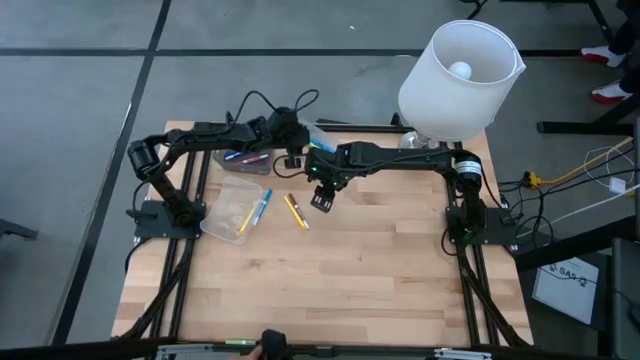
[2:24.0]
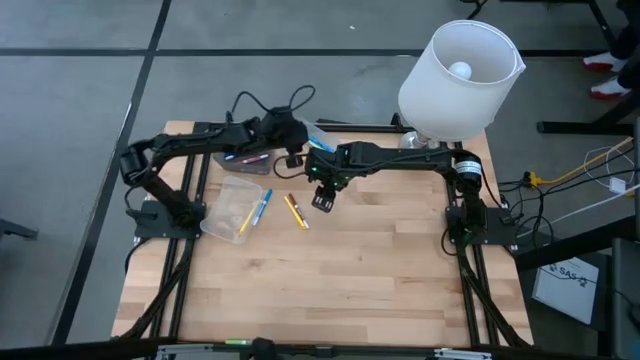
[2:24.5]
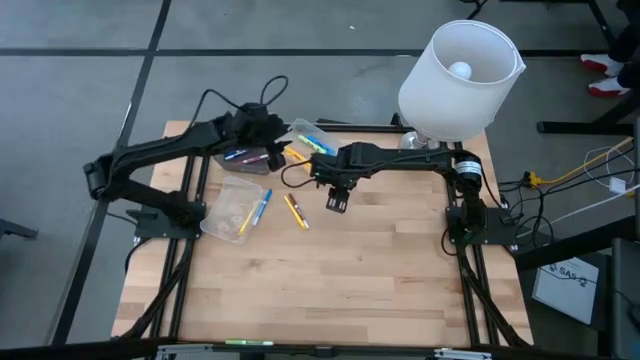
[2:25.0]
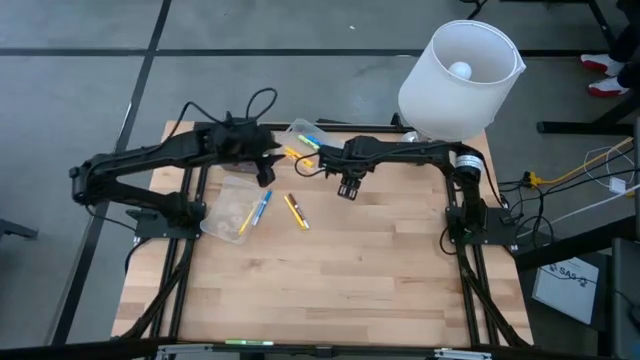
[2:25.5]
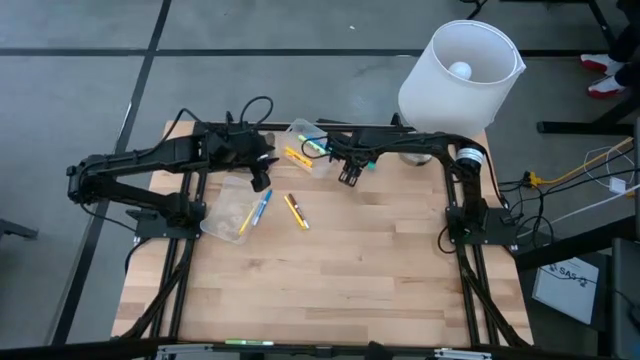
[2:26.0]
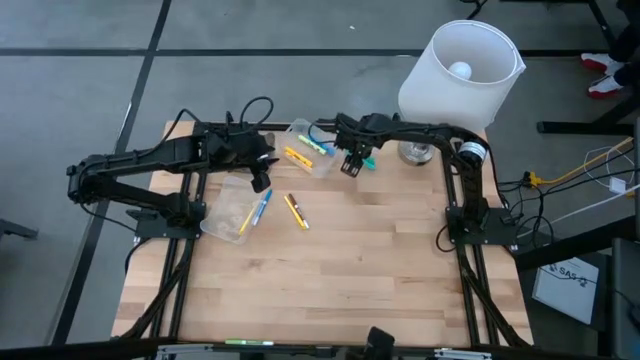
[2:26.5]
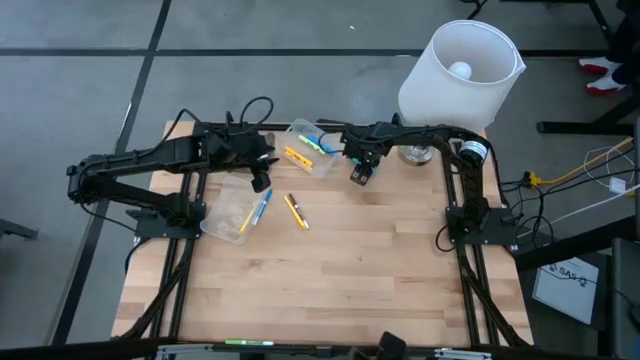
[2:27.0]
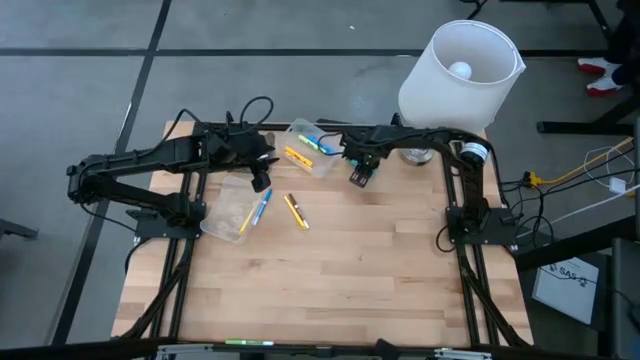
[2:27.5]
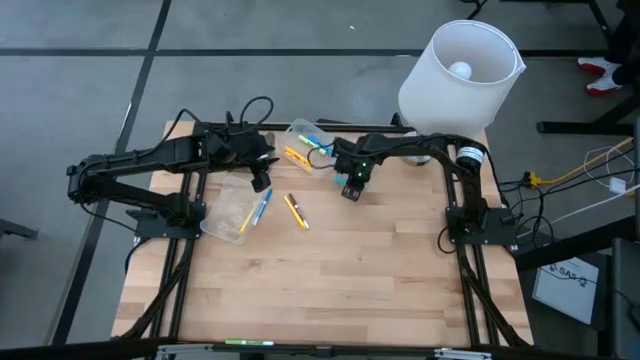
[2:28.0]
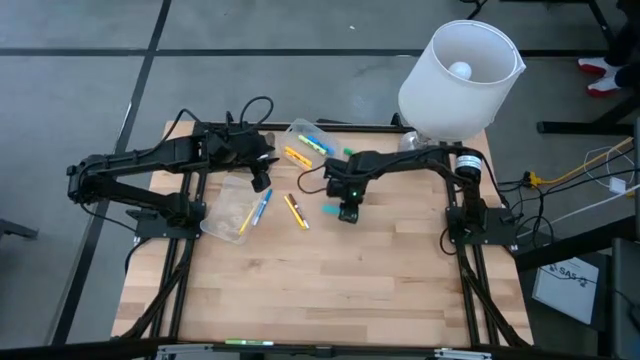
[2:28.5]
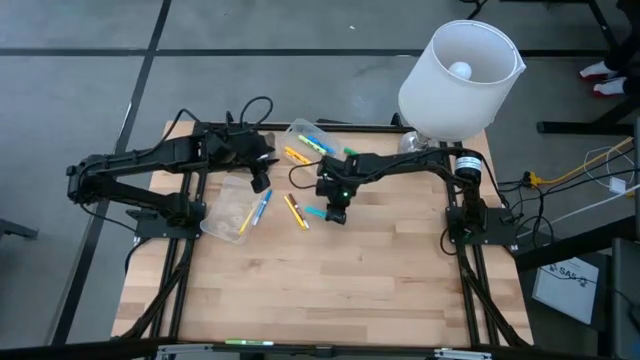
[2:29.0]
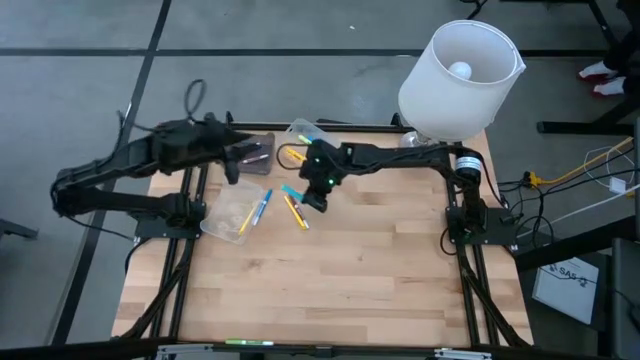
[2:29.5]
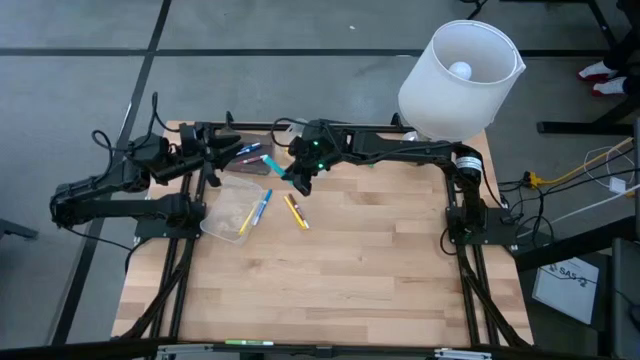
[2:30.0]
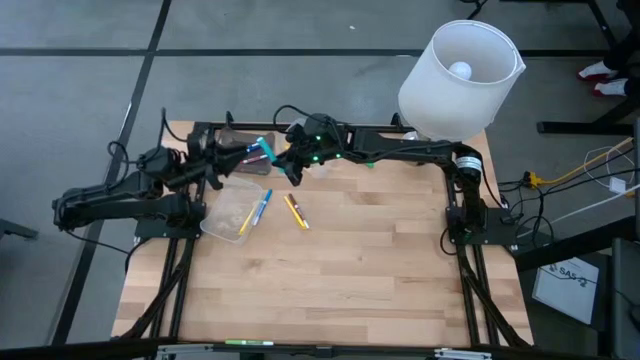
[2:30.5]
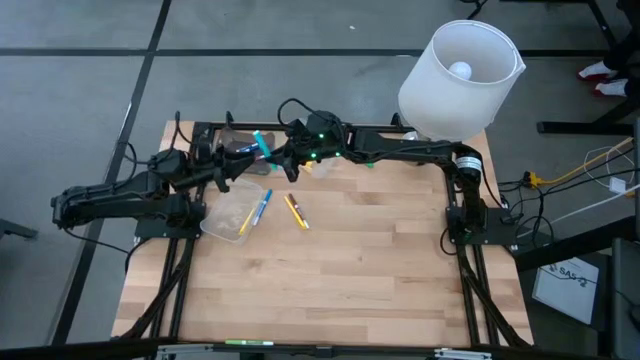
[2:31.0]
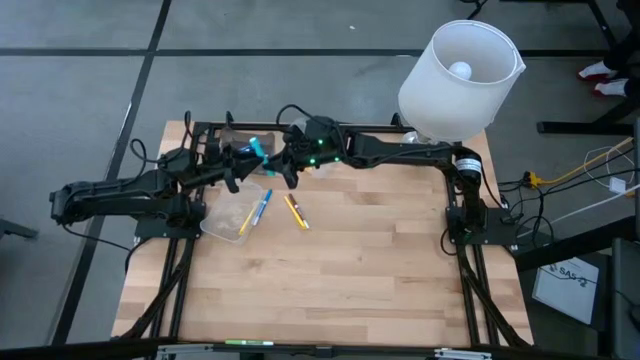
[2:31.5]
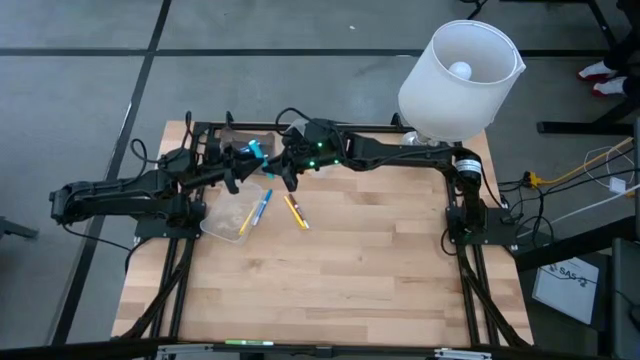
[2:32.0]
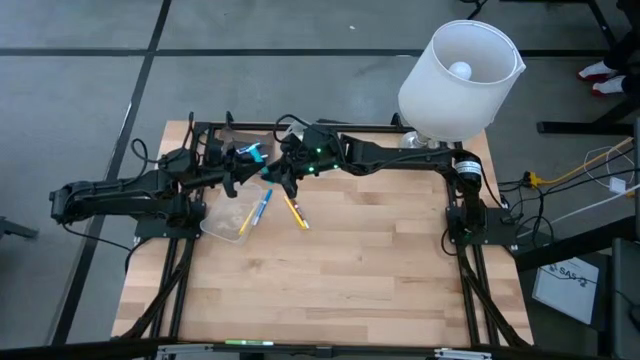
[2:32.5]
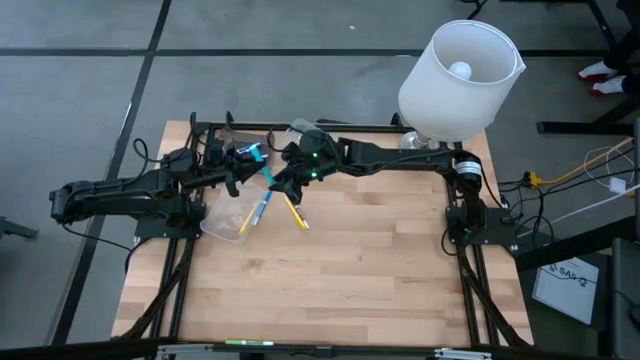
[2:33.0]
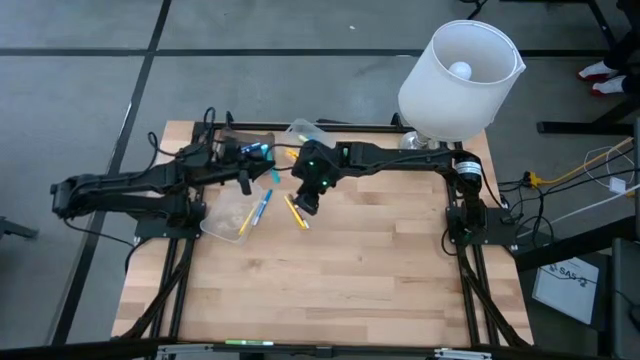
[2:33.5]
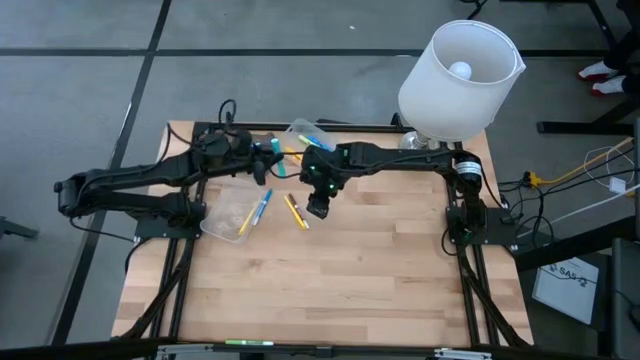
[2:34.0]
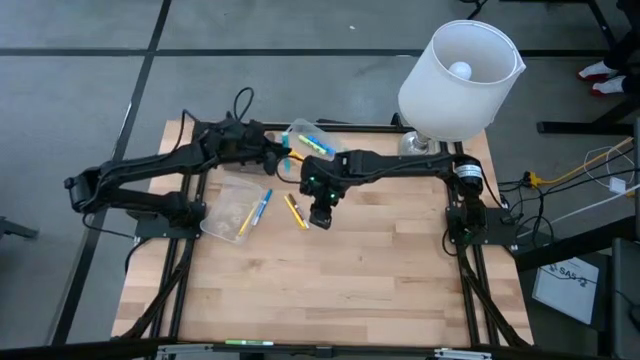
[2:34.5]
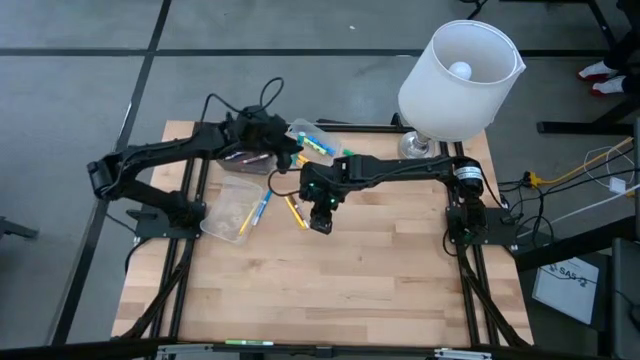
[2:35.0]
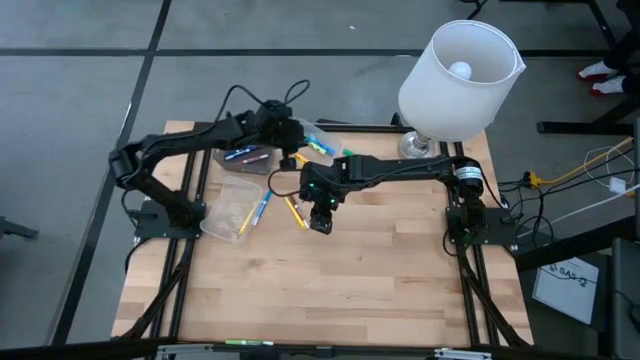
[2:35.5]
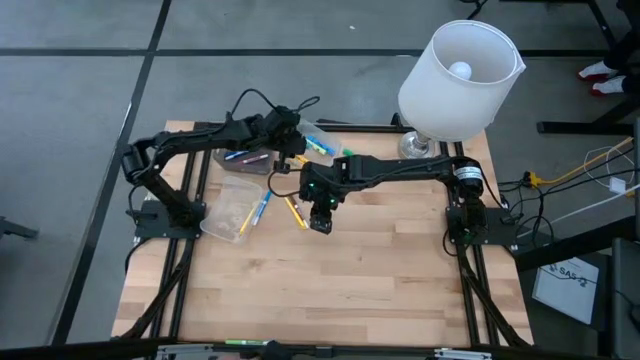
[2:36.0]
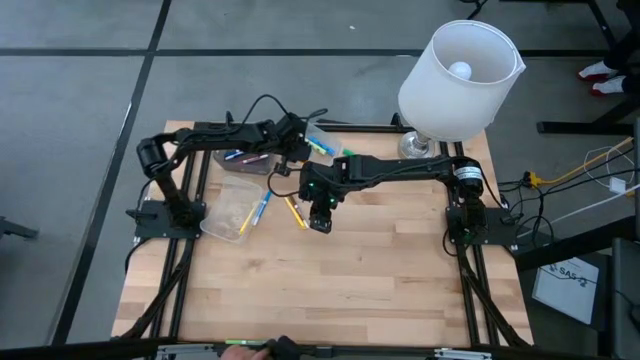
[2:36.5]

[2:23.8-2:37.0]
Task: Pick & Place Markers
Put the light blue highlighter into the top transparent bin

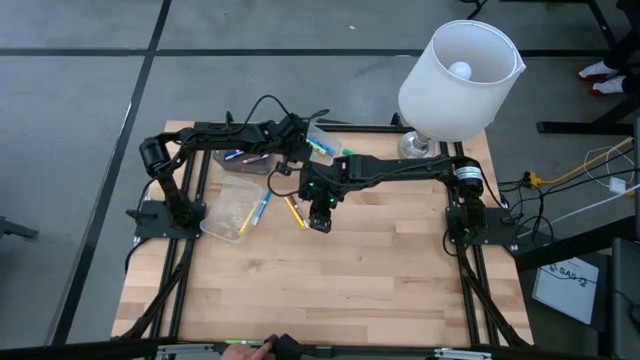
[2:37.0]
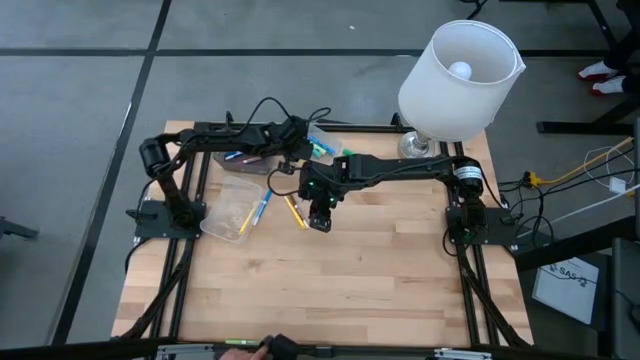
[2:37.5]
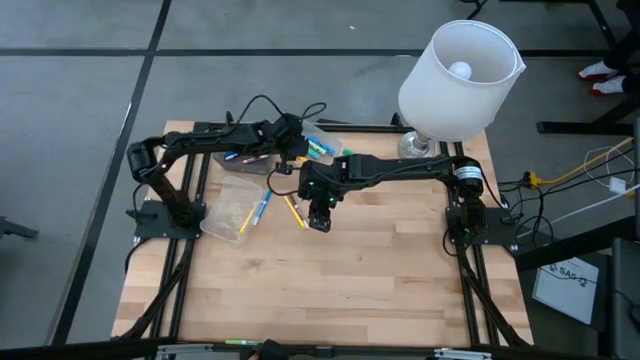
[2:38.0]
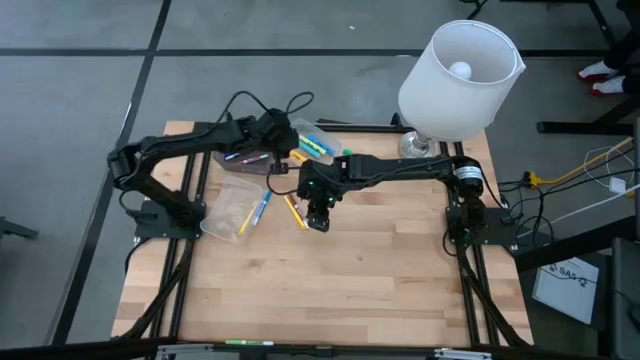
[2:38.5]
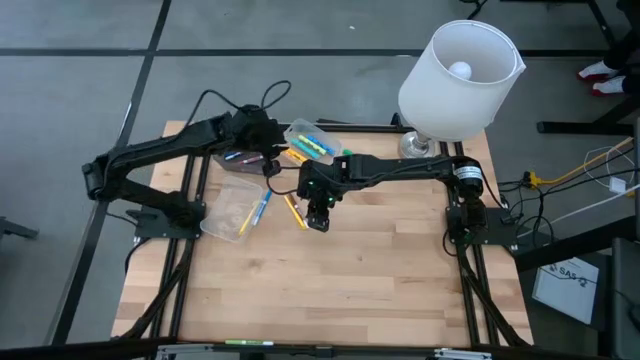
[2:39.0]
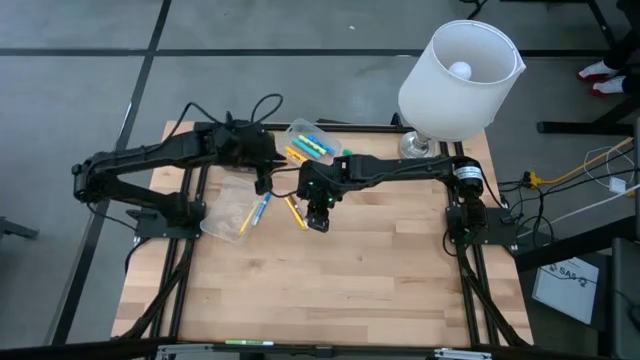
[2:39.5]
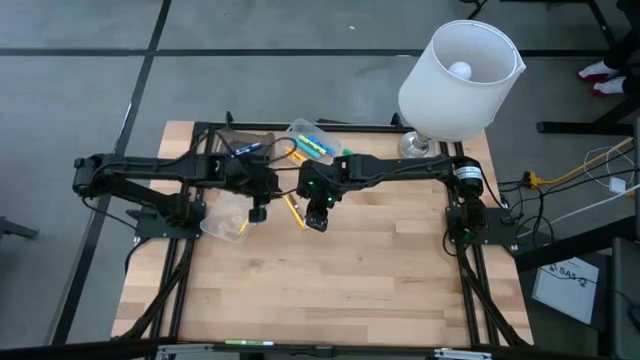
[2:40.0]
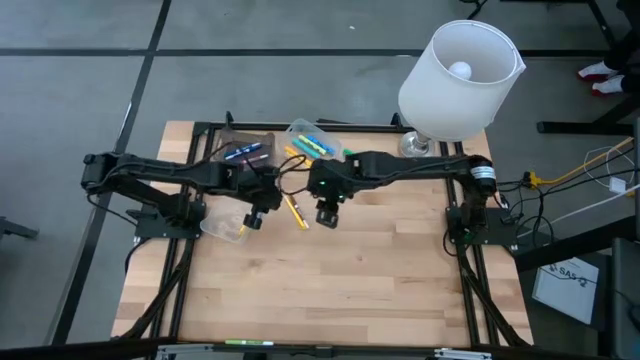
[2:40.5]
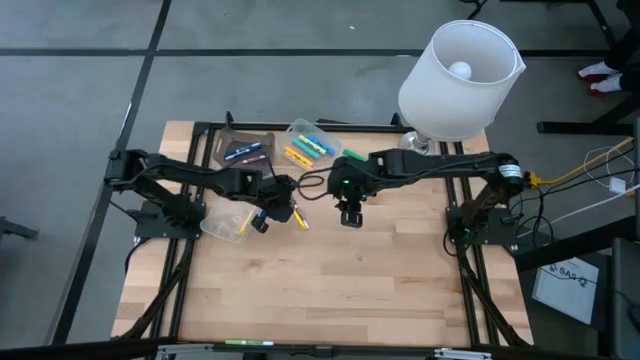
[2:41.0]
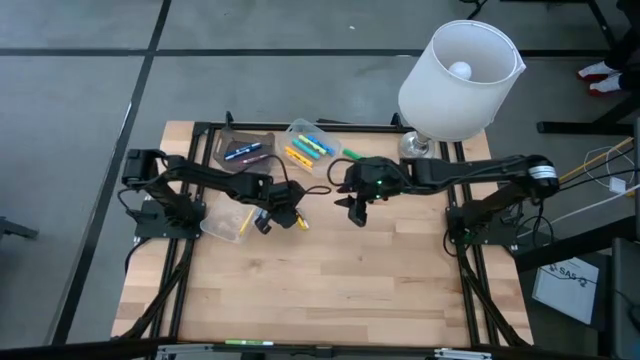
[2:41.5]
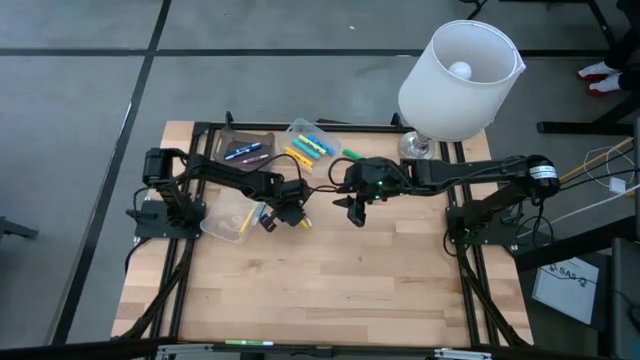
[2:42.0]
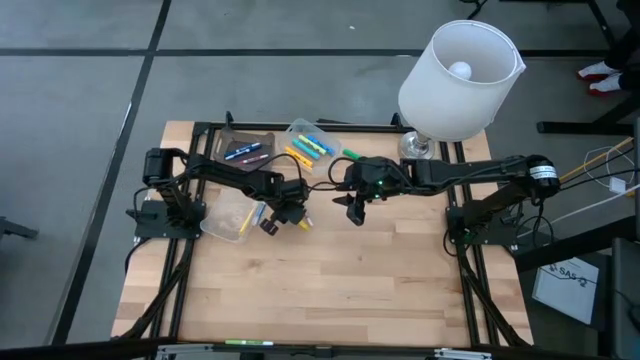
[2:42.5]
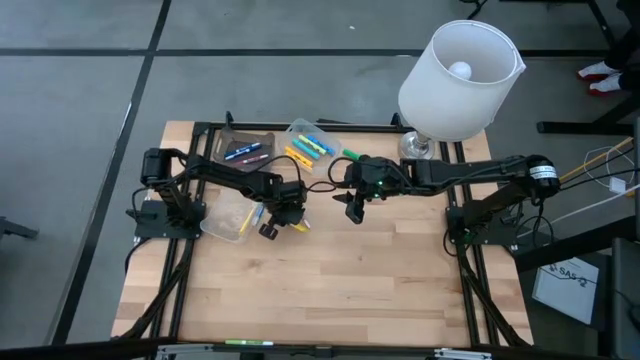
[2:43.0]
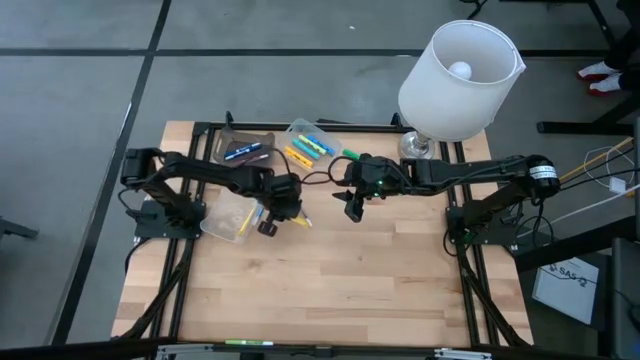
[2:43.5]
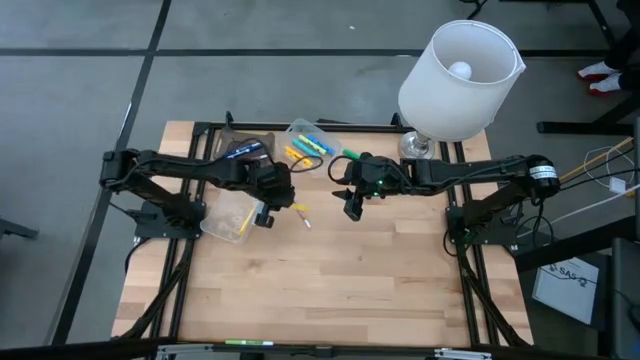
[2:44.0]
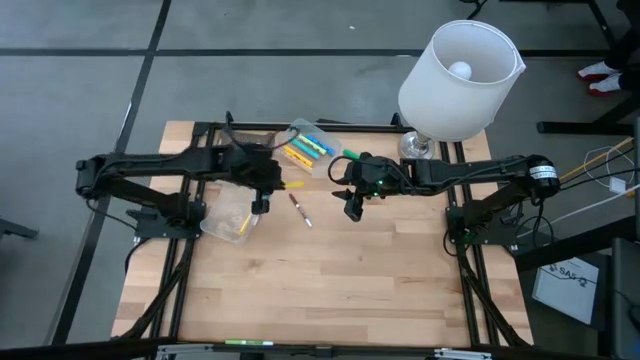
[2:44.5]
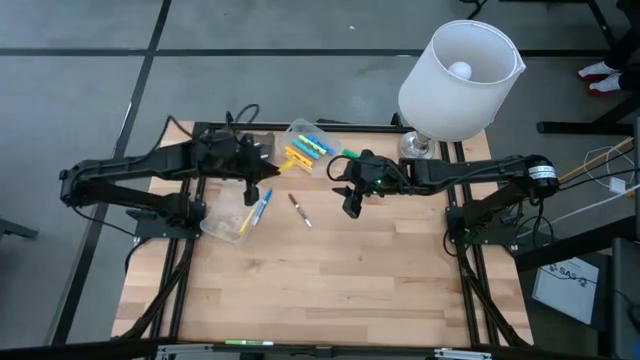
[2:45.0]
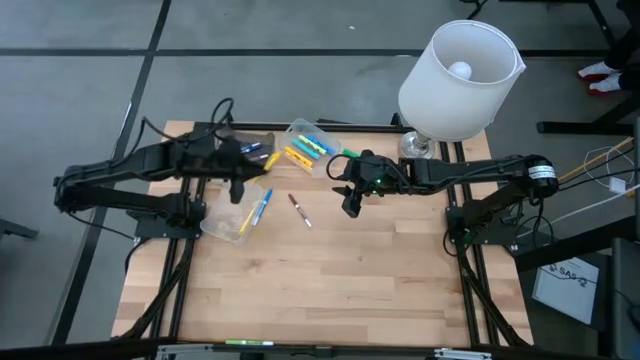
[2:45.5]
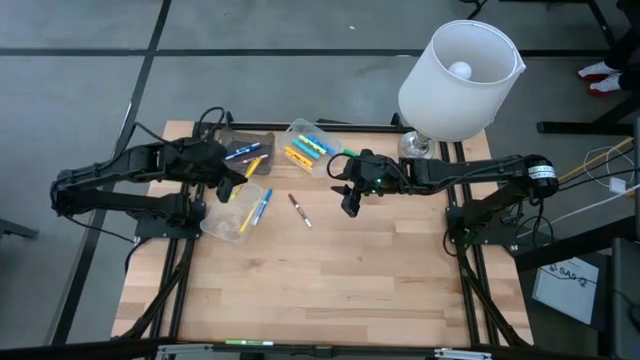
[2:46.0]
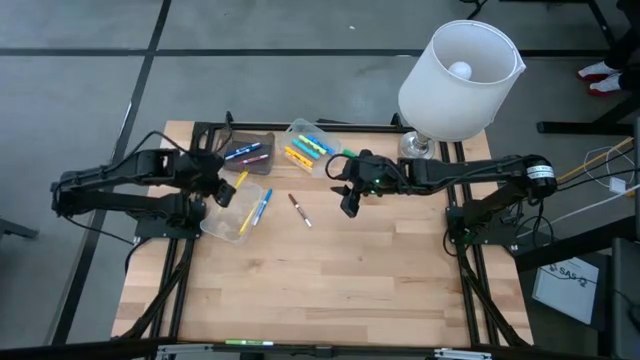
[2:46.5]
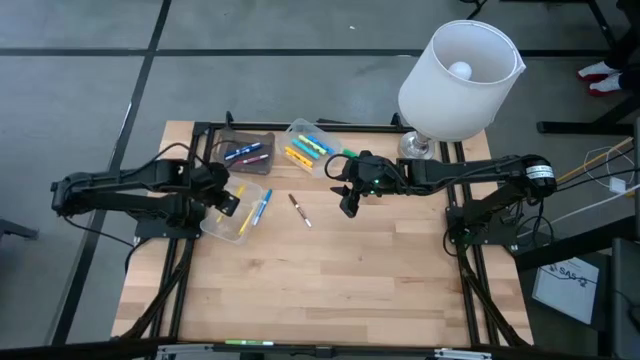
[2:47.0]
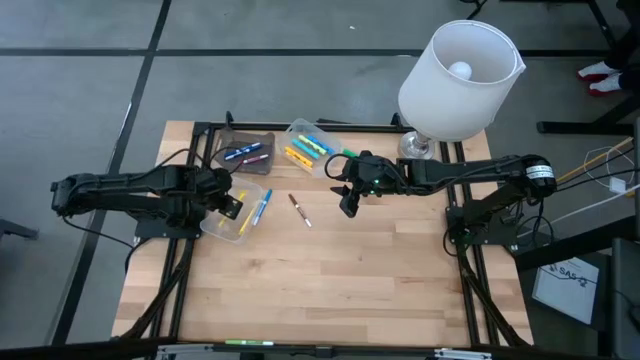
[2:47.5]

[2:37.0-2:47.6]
Put the yellow pen into the bottom transparent bin
